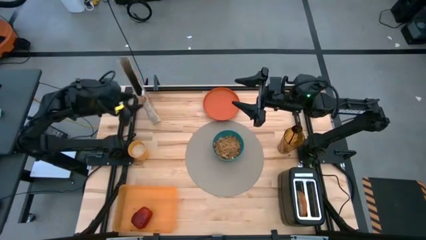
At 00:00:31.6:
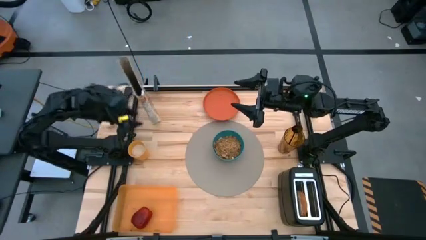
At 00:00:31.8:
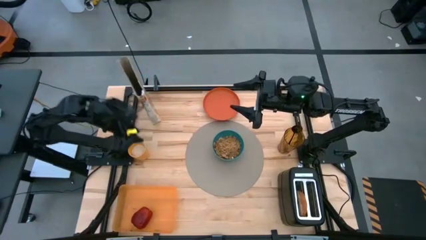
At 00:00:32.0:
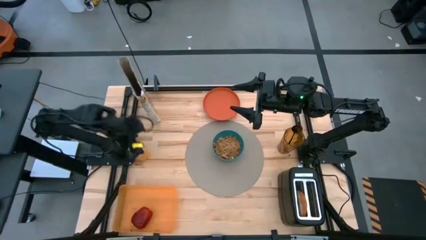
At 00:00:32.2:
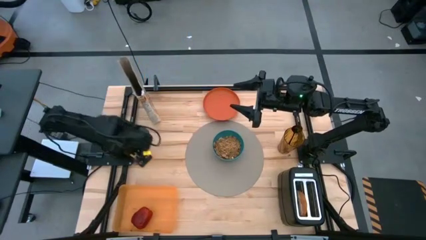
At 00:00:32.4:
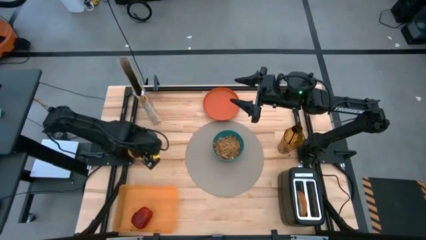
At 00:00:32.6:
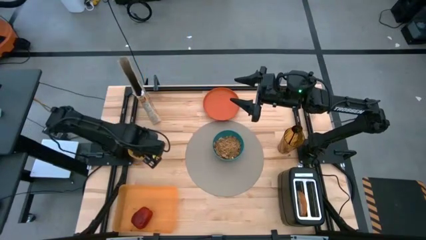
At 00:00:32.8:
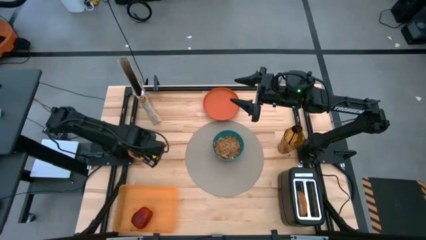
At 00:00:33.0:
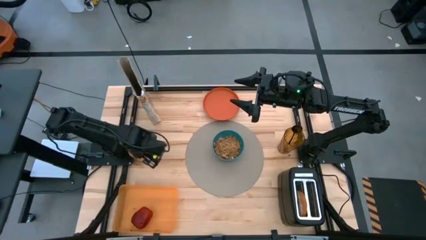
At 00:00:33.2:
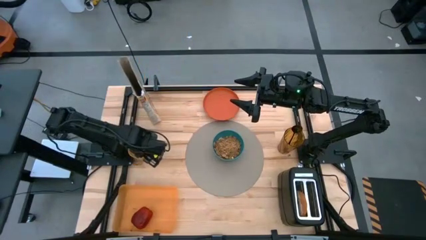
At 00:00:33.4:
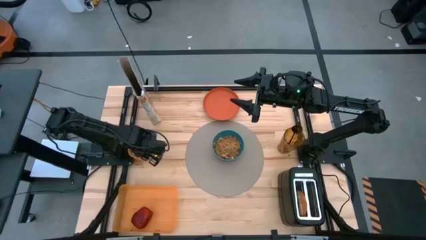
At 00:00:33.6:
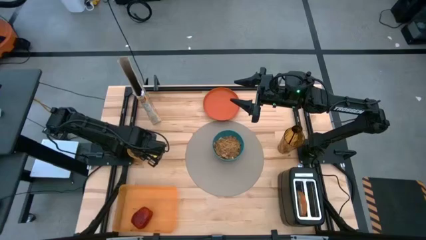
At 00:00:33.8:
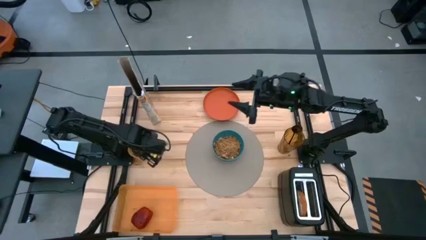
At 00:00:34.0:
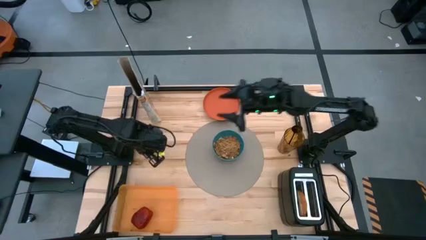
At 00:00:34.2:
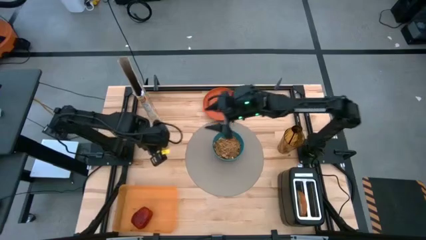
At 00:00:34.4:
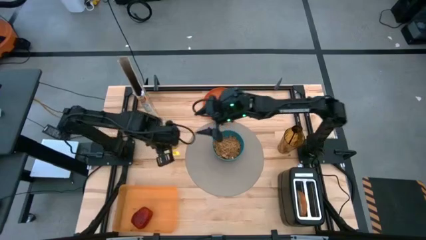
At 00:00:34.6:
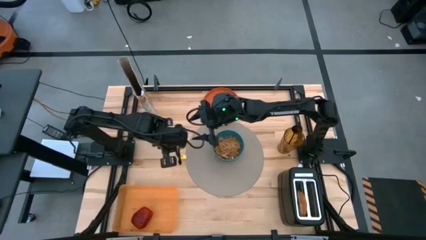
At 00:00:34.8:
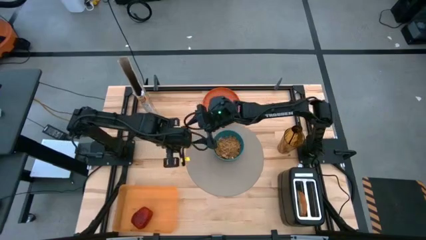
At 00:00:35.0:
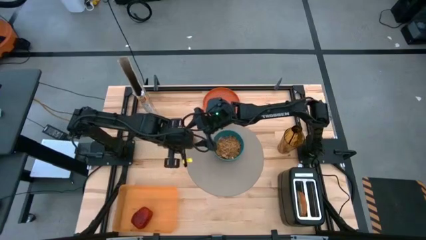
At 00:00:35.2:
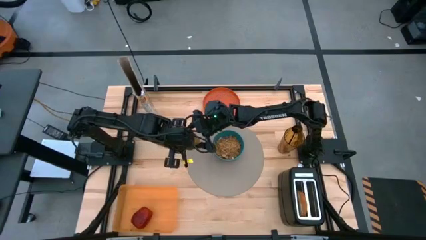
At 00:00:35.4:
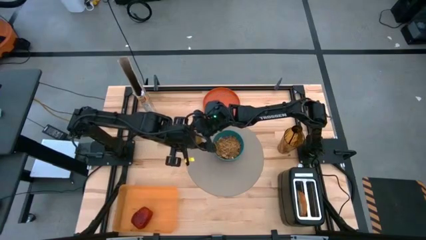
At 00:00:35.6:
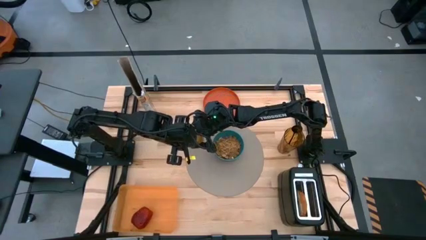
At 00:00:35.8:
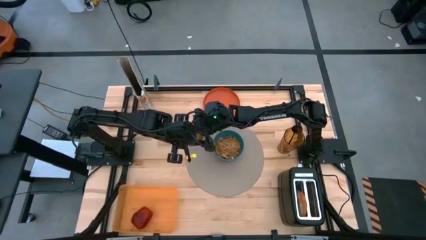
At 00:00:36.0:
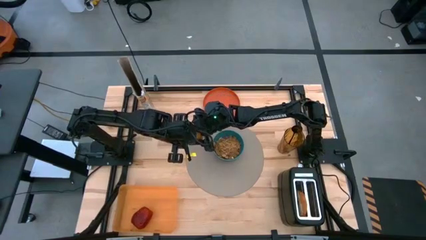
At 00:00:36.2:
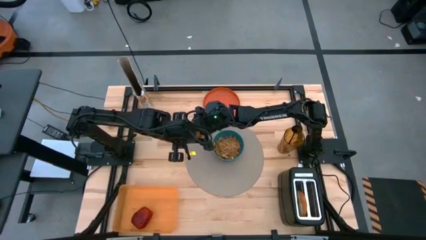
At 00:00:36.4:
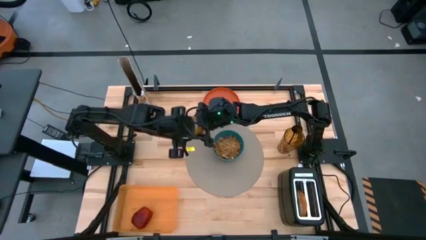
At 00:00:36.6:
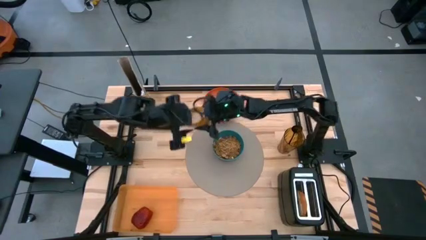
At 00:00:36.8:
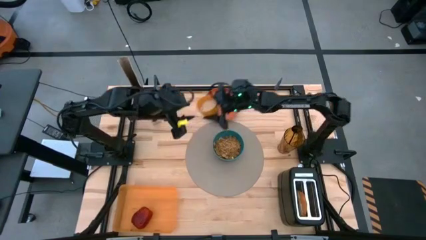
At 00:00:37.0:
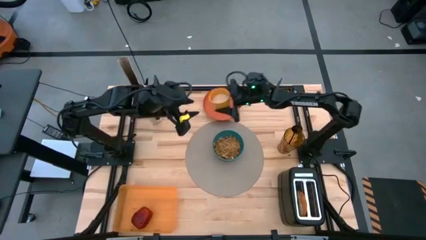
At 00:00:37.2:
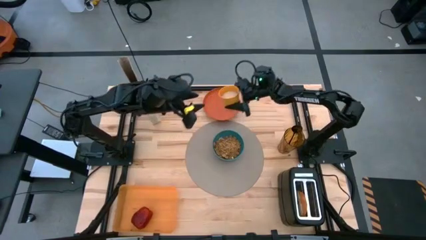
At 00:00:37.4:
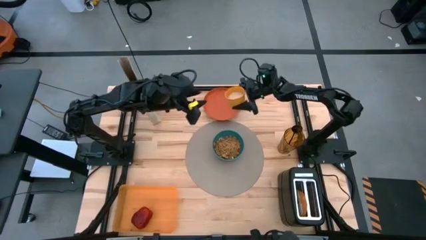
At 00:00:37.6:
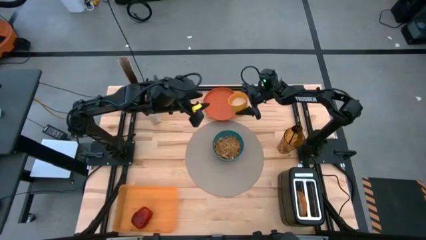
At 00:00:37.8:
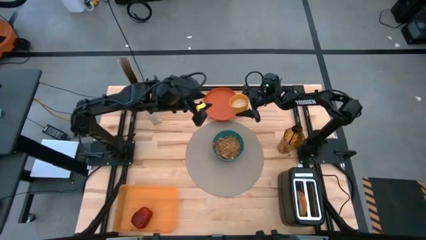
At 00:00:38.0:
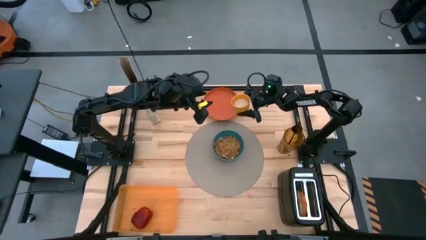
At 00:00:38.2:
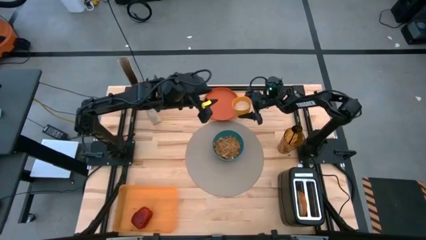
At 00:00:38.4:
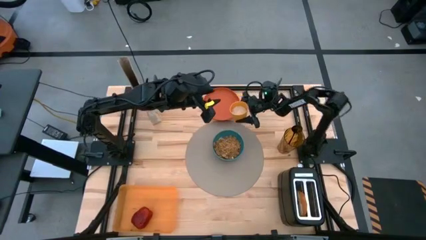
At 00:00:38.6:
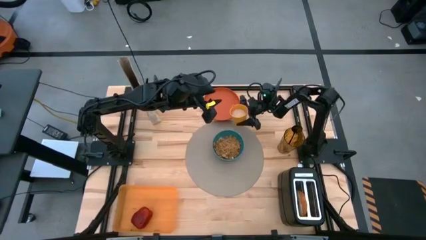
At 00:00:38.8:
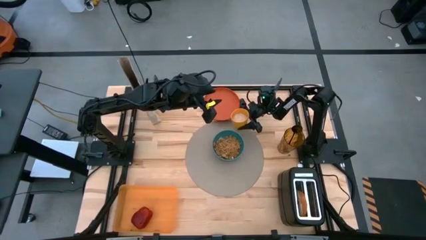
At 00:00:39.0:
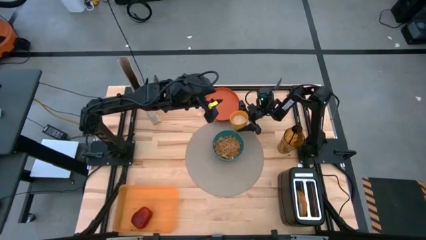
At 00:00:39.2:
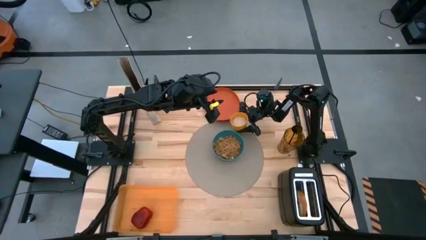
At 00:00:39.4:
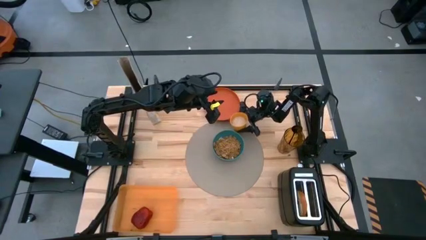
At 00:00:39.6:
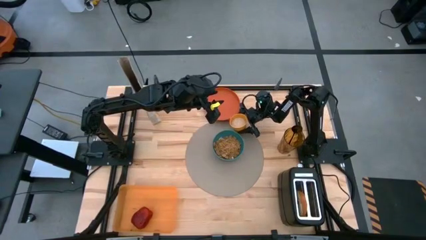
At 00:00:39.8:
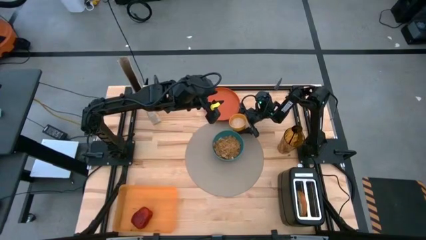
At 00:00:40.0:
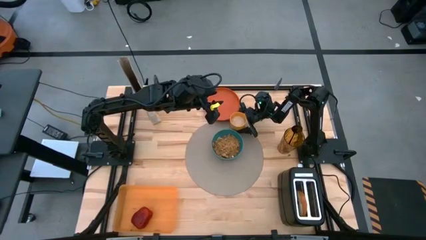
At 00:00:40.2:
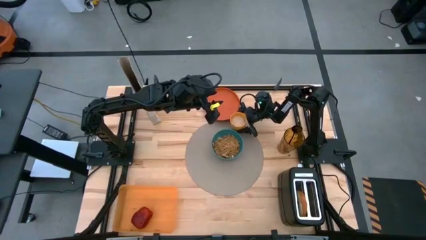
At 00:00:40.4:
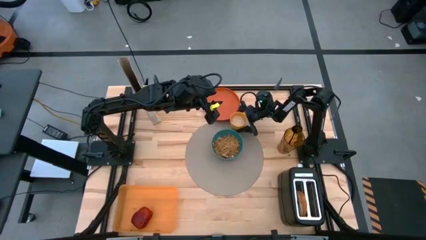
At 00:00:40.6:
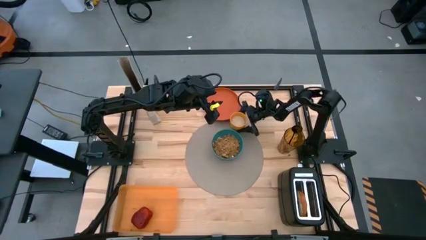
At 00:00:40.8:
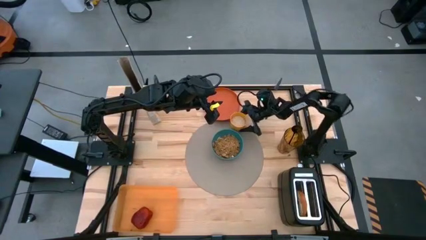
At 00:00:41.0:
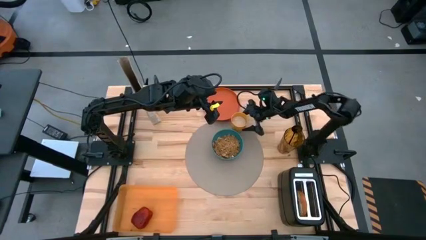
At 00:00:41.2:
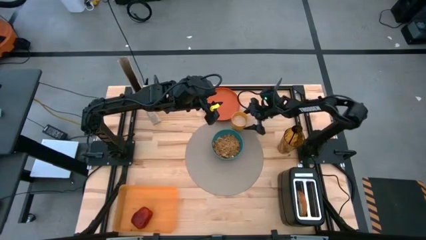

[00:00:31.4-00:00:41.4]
Task: Arrange a breakfast setting
Put the yellow cup with grains of rice on the gray mat to the top right of the green bowl

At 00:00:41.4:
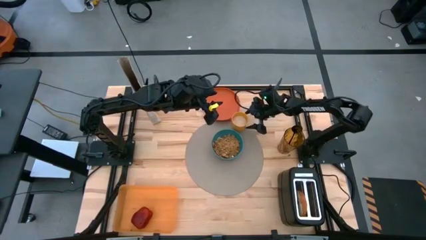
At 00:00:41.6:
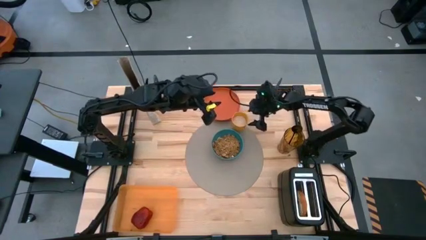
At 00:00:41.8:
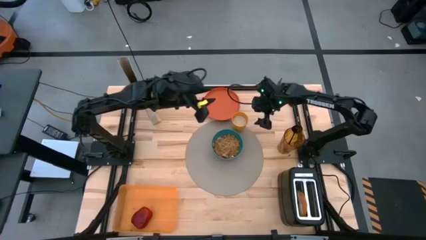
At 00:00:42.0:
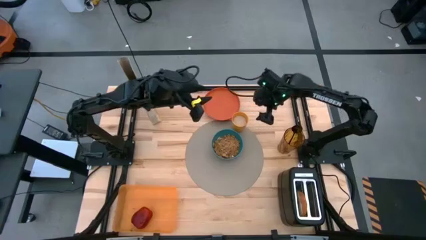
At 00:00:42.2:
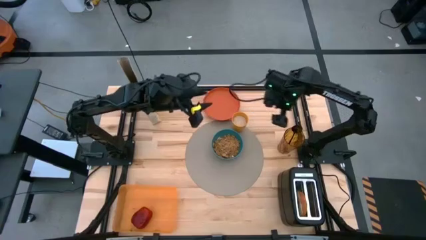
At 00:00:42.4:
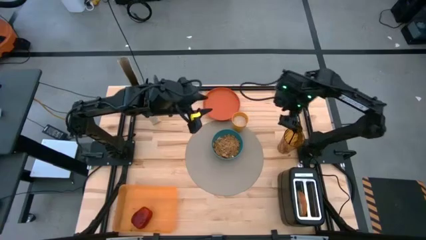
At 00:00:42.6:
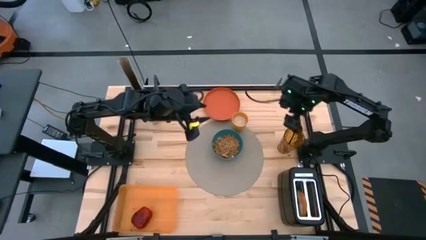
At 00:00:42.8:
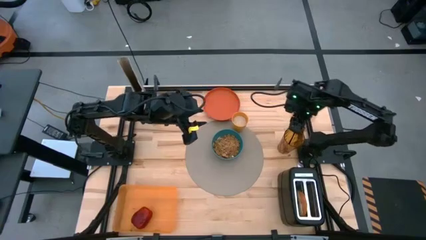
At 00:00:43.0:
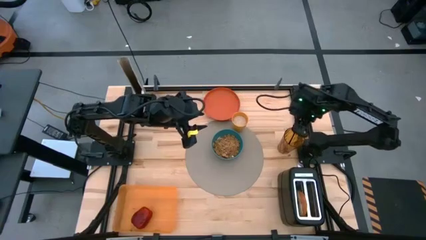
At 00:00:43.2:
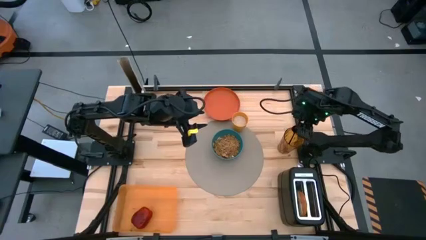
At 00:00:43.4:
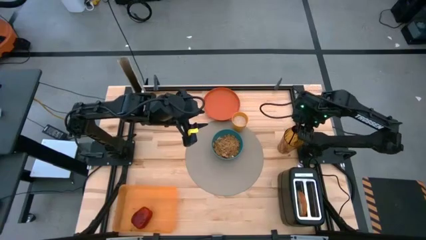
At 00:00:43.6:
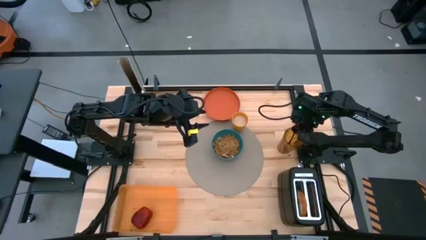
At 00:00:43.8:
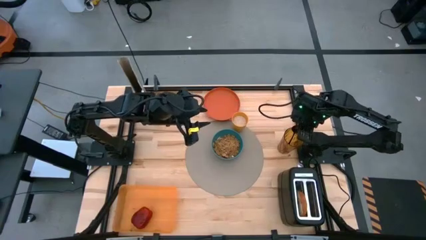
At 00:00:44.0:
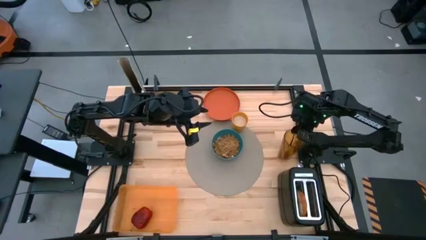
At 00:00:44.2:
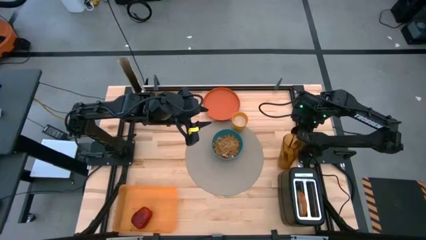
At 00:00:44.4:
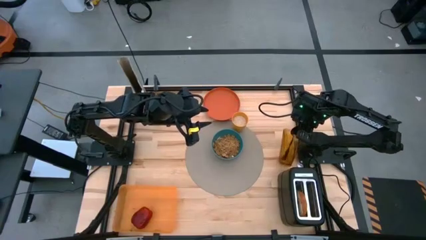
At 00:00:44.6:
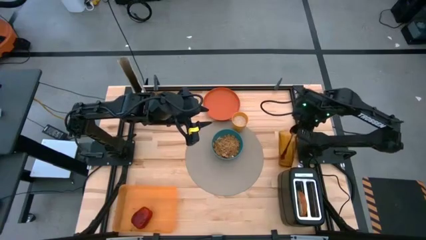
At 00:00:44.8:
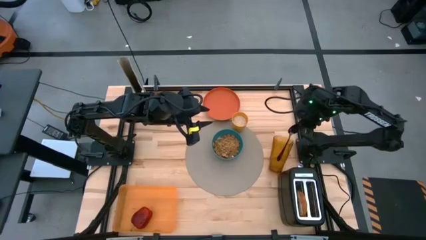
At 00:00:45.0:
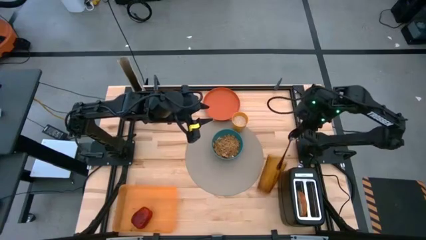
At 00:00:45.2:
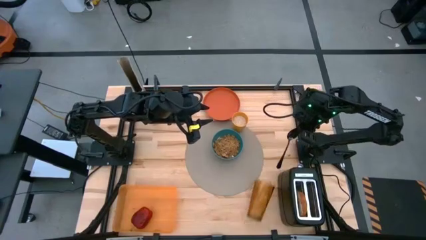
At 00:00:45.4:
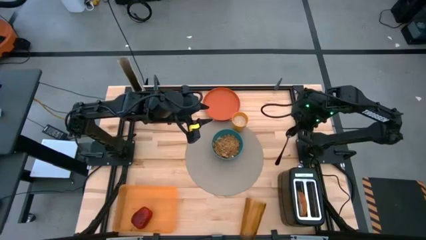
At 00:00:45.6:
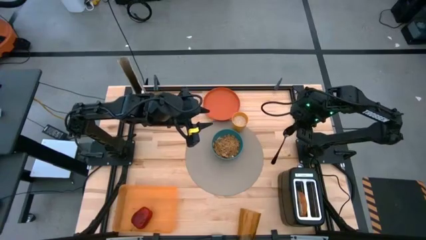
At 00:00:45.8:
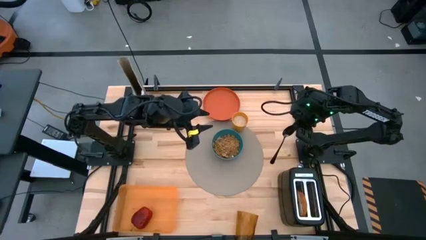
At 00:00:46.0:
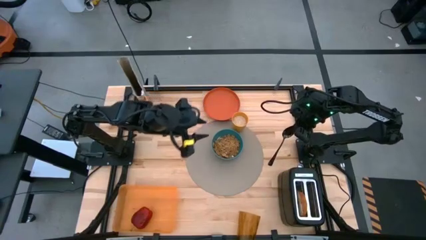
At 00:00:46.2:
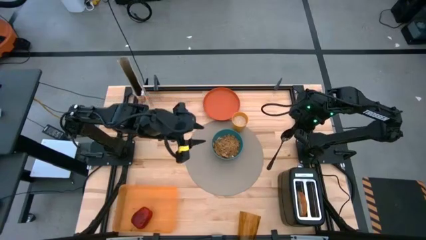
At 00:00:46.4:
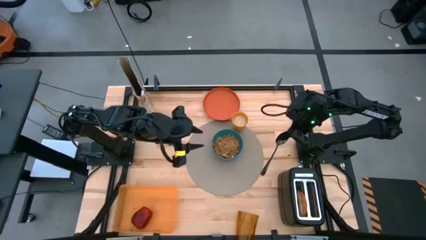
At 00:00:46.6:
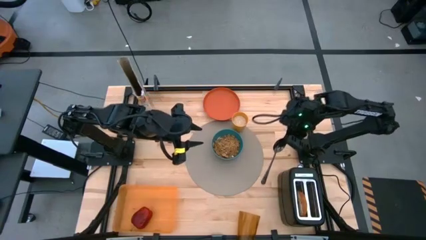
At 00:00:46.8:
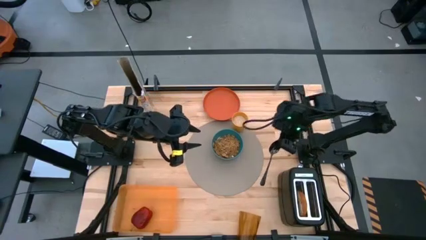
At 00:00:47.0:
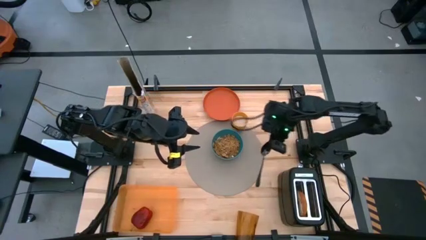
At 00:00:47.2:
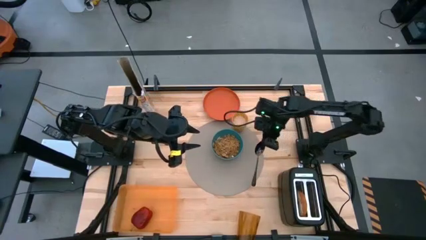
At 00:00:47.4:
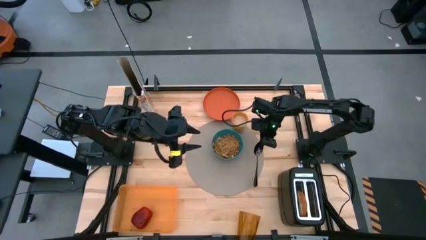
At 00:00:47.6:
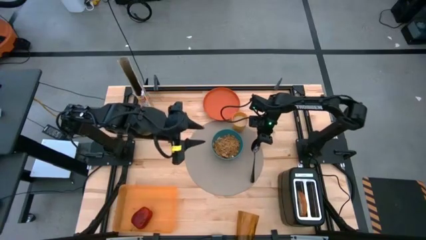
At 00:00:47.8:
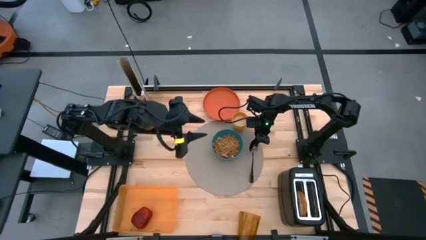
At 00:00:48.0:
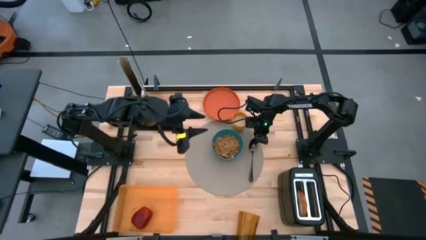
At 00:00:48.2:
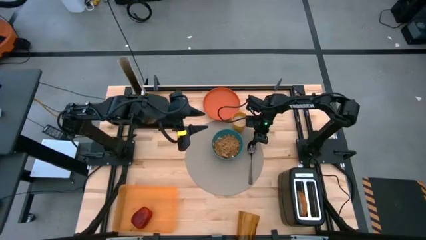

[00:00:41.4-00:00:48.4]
Put the black spoon on the gray mat to the right of the green bowl

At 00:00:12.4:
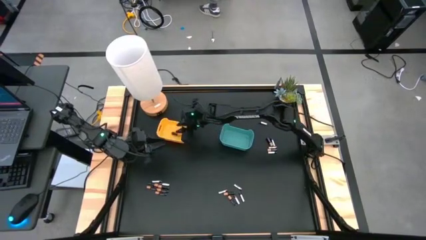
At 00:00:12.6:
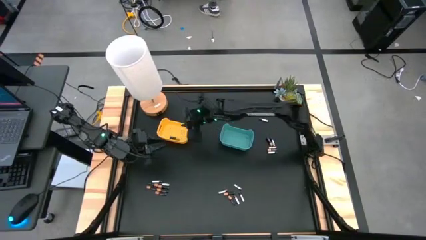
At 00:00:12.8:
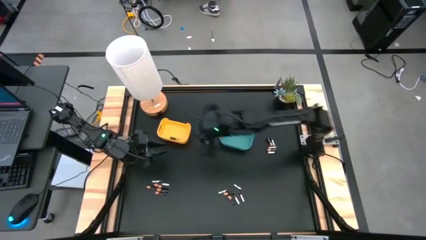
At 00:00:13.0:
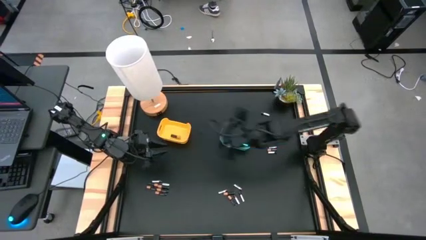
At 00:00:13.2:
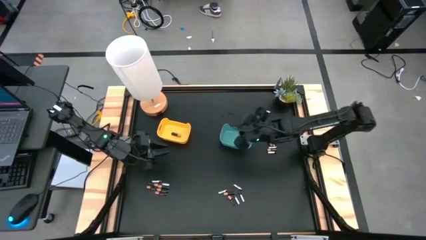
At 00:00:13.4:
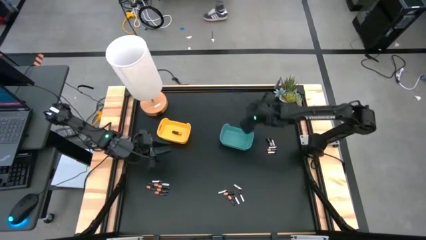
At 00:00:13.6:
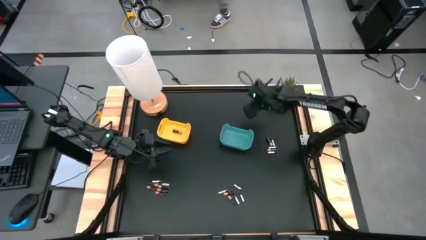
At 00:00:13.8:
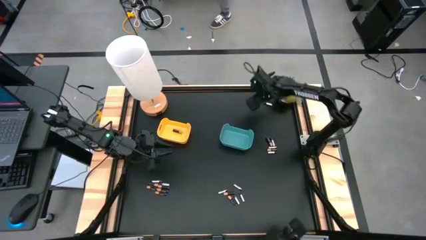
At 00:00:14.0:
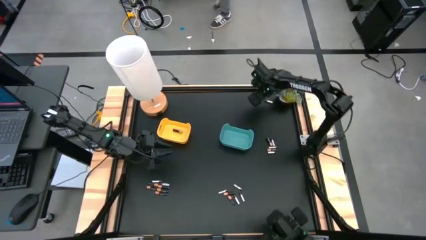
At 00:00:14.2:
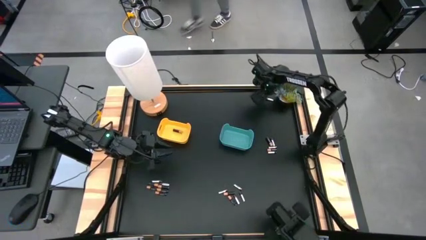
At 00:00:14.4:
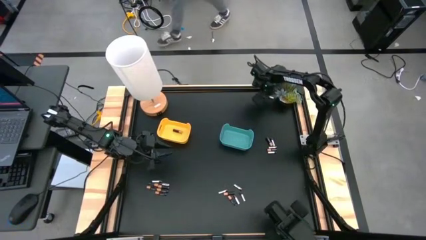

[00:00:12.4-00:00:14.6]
Task: Sort batteries
Put the silver battery into the yellow bin
